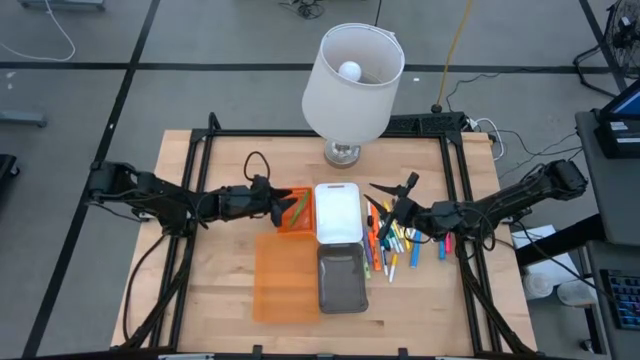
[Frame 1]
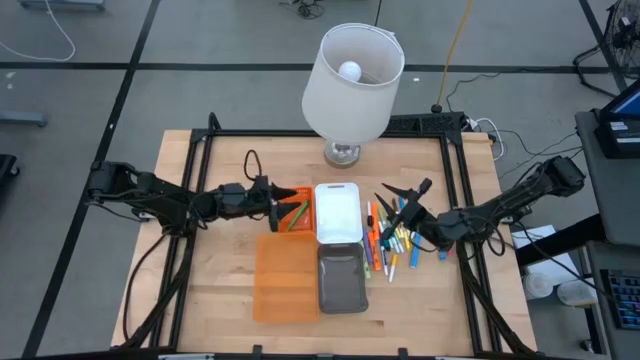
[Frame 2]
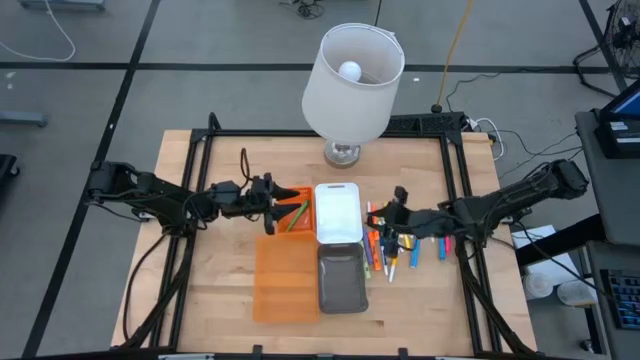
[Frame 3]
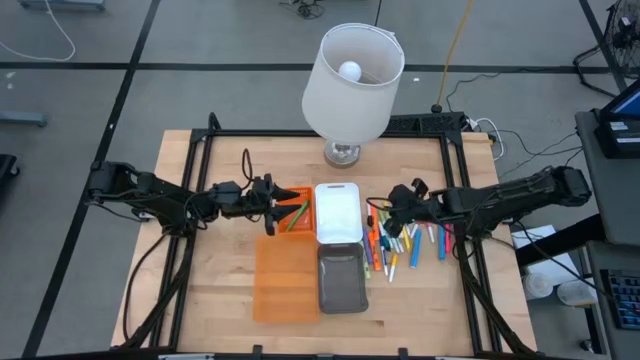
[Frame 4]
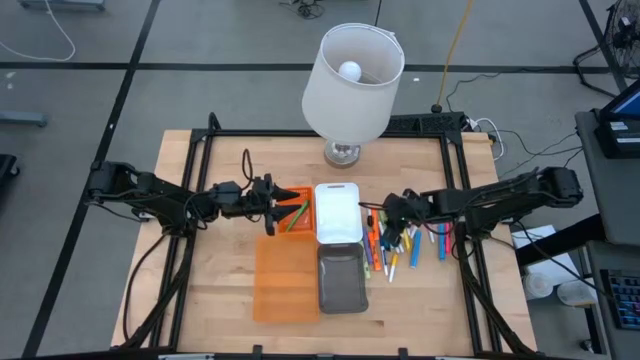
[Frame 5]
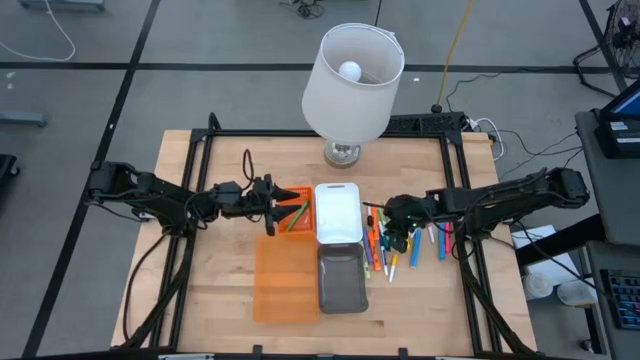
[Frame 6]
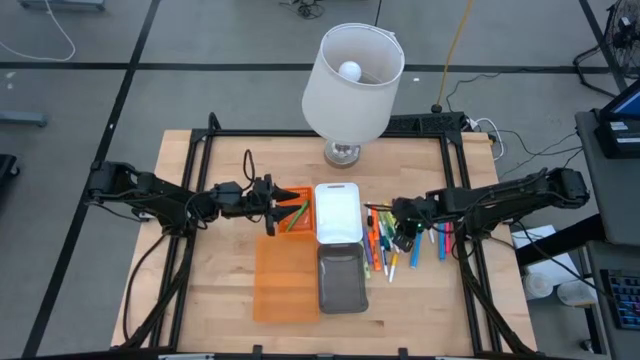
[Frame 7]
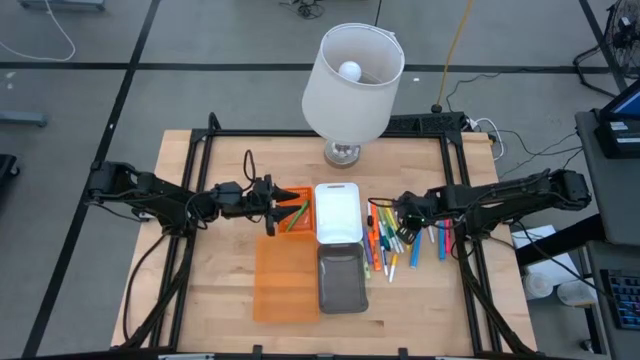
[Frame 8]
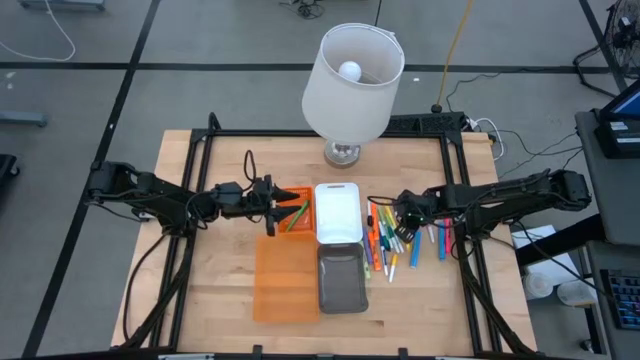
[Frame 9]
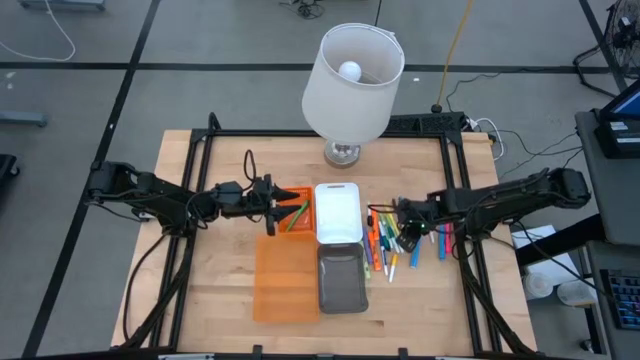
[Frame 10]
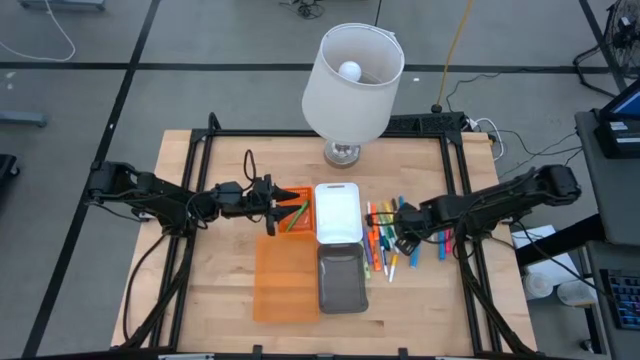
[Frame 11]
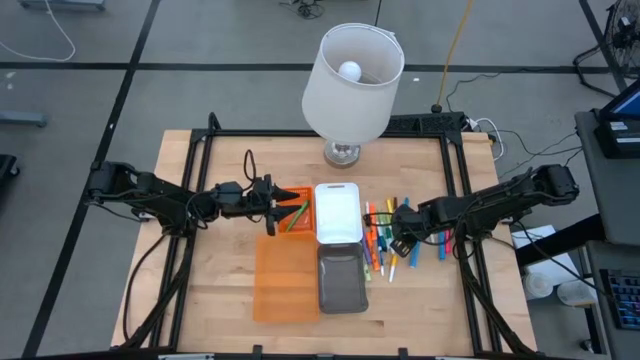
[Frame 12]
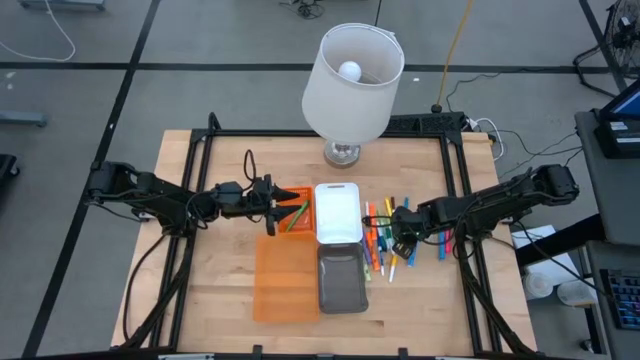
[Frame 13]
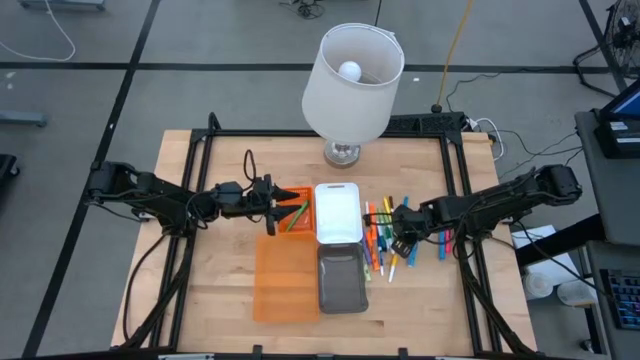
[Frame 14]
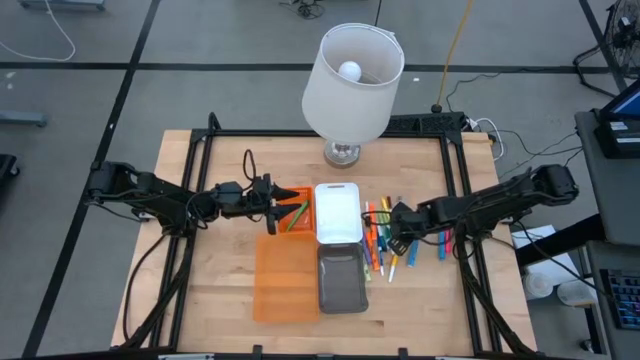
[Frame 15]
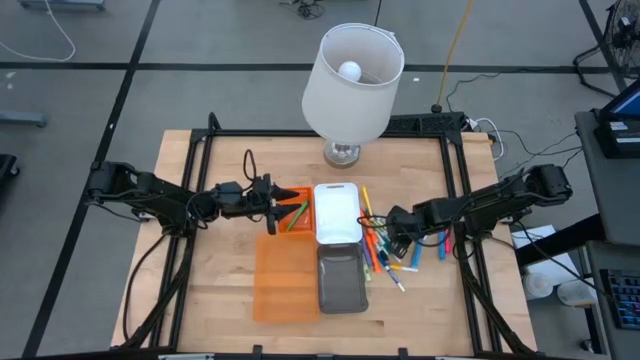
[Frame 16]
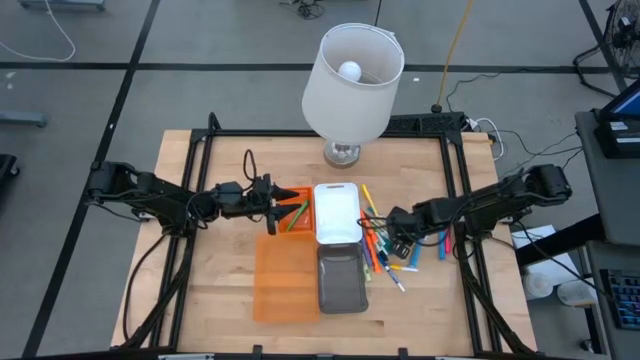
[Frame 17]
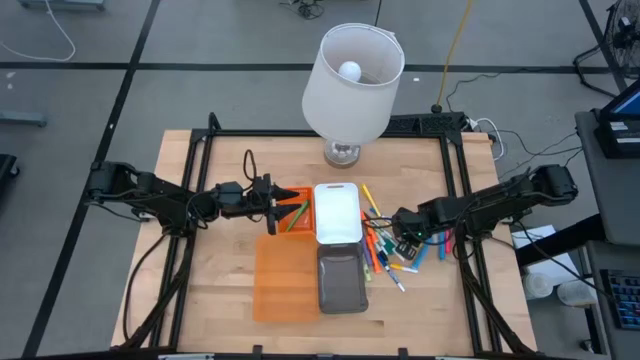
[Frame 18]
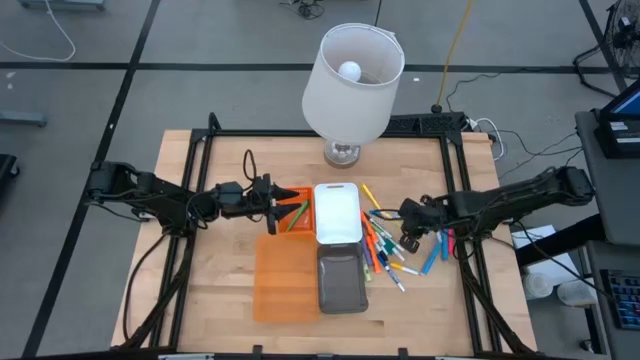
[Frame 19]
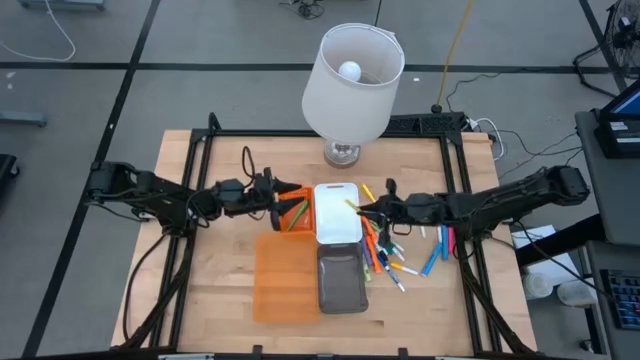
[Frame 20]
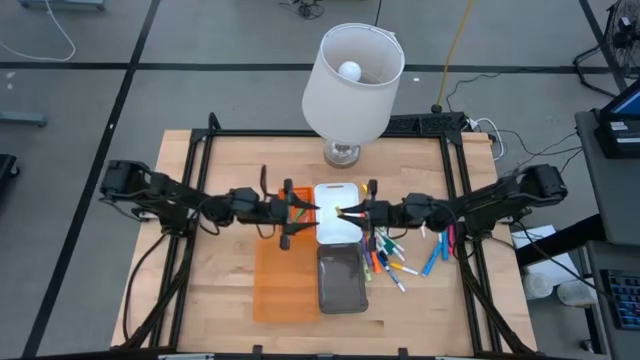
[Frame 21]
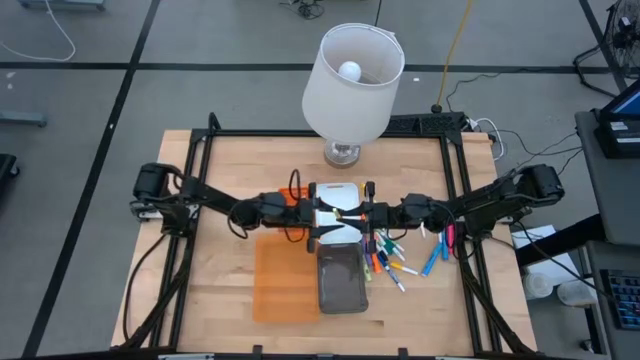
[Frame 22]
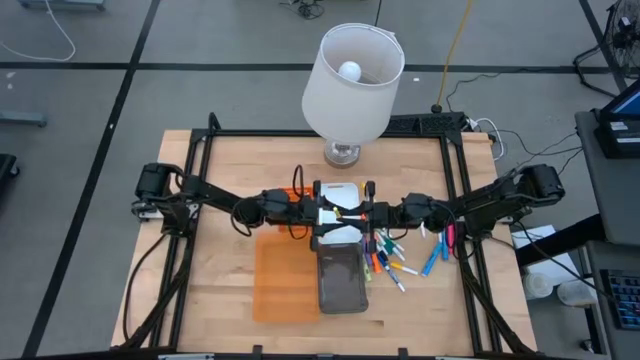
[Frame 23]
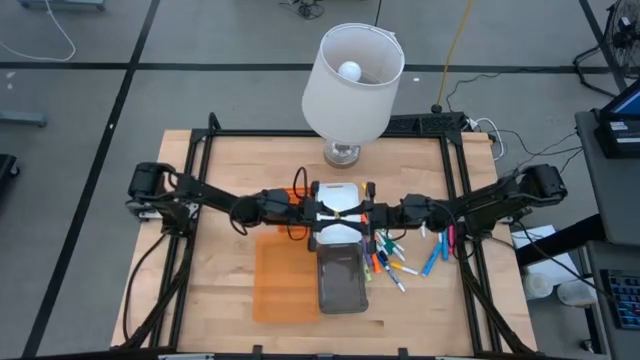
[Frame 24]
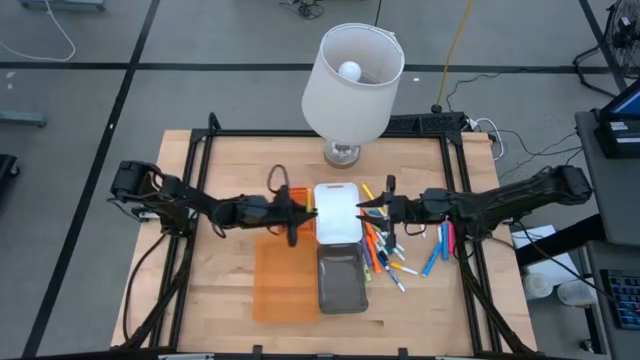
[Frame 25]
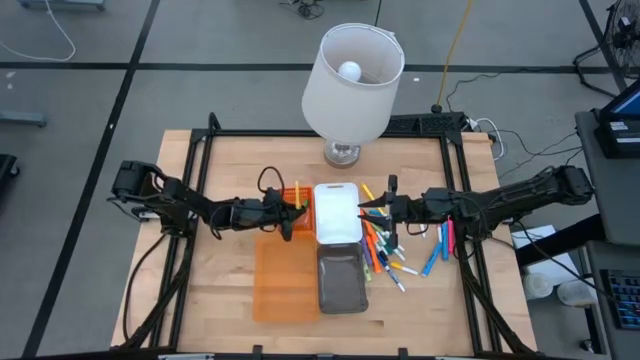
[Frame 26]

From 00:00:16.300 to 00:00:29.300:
Task: Pick & Place Markers
Put the right yellow pen into the orange basket

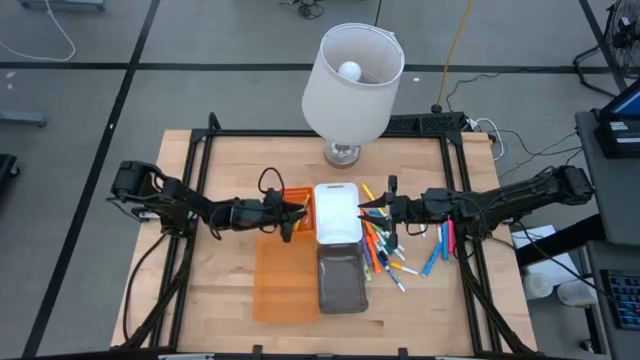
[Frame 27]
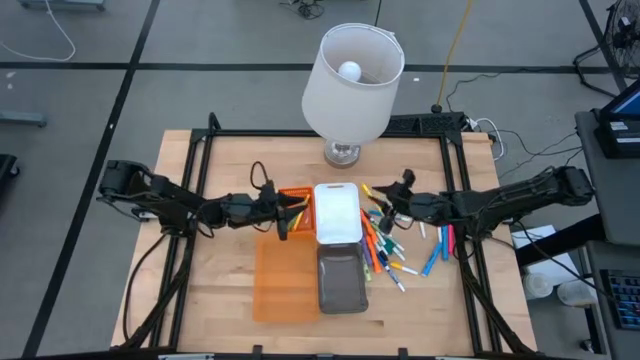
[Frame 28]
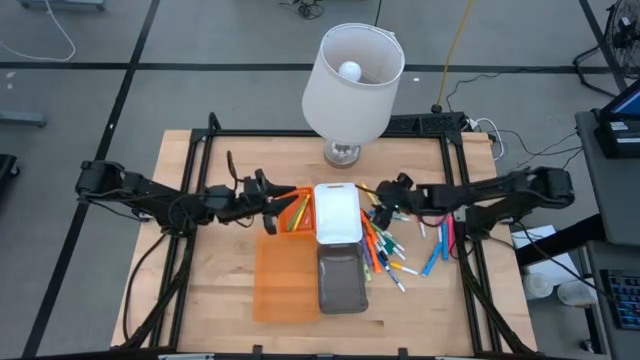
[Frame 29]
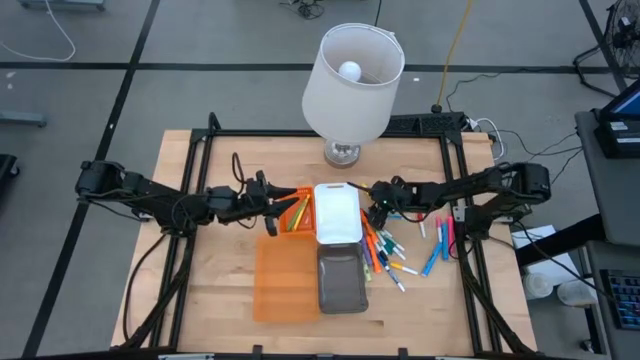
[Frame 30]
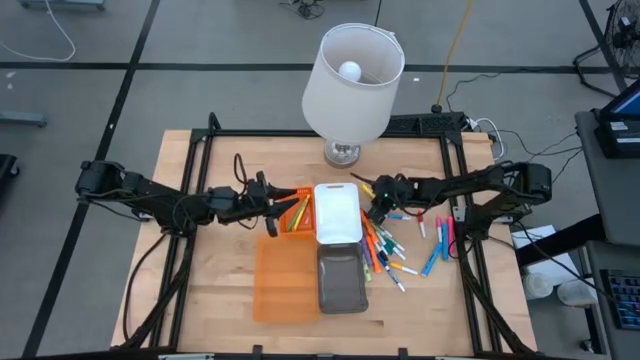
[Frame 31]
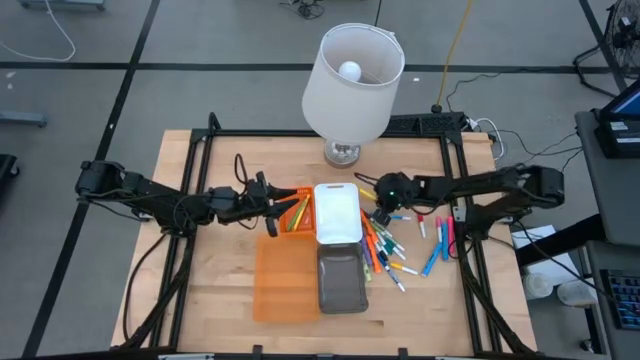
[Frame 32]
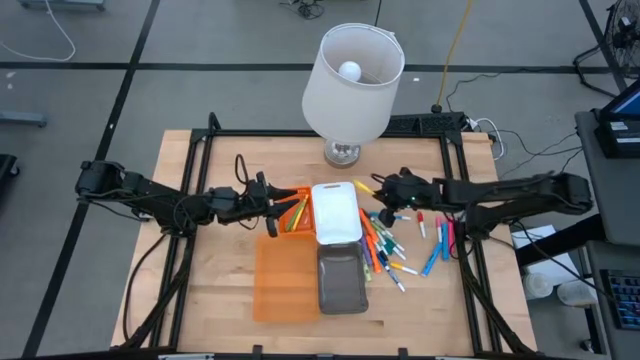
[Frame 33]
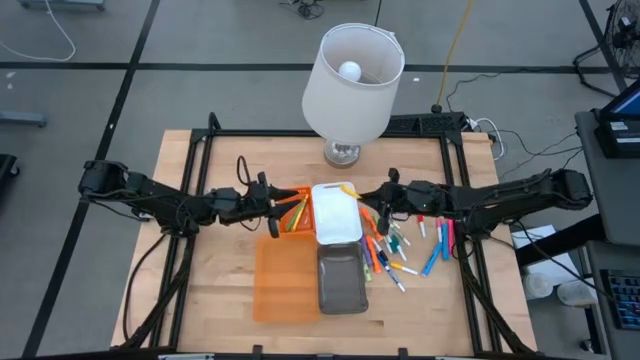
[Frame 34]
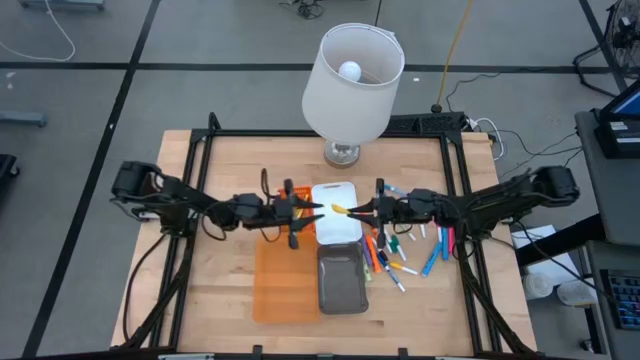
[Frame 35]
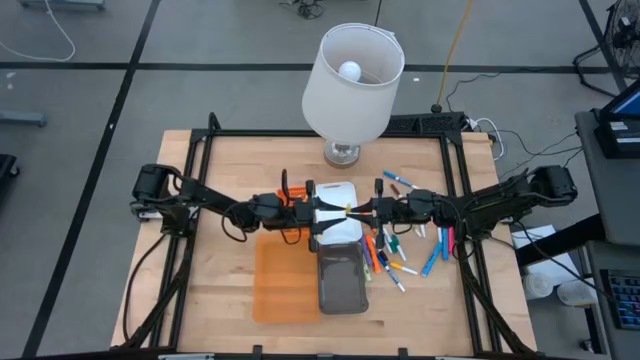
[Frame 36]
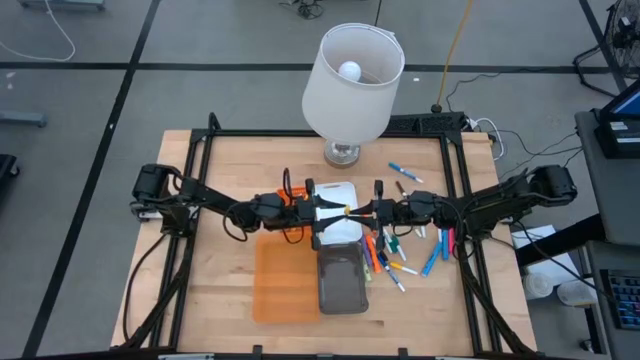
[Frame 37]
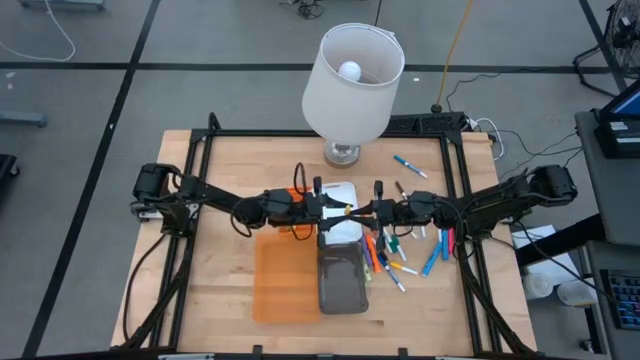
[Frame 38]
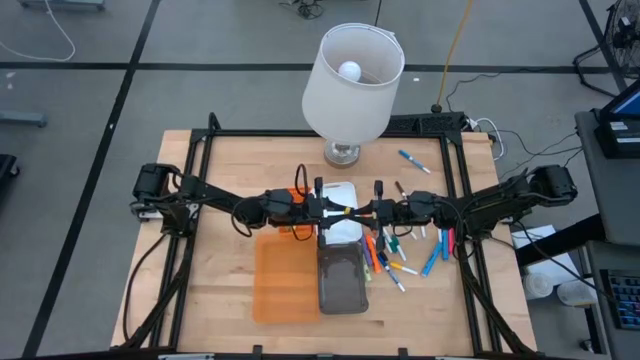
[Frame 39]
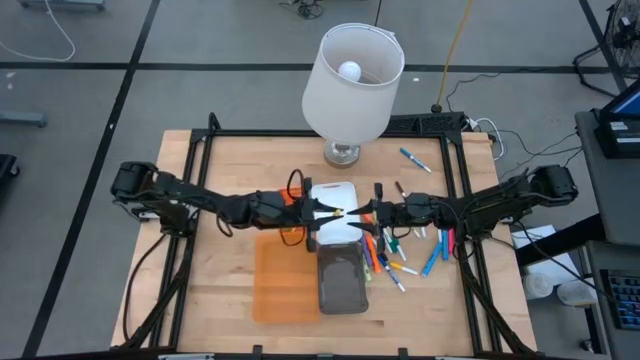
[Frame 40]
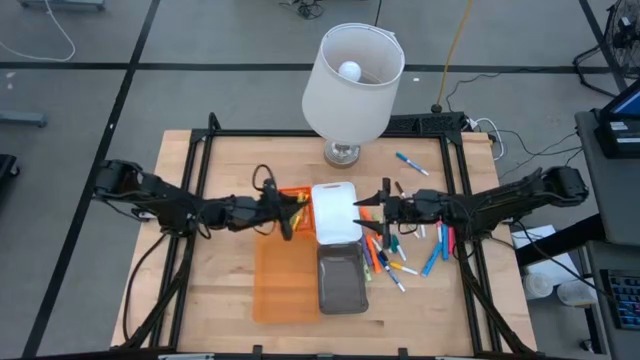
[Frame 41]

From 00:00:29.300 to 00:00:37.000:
Put the yellow pen into the orange basket

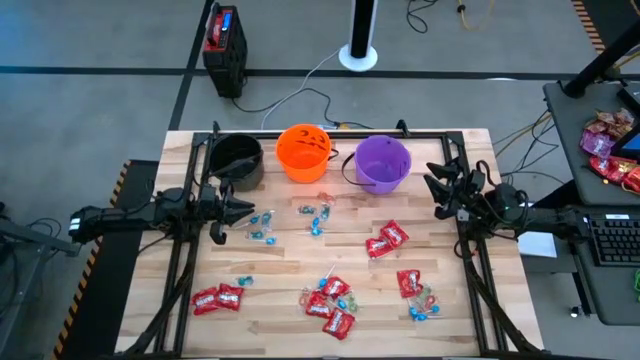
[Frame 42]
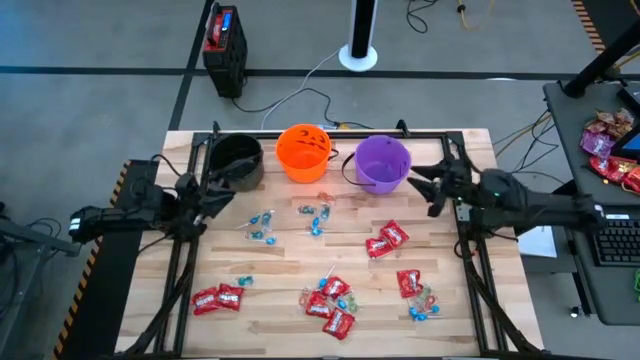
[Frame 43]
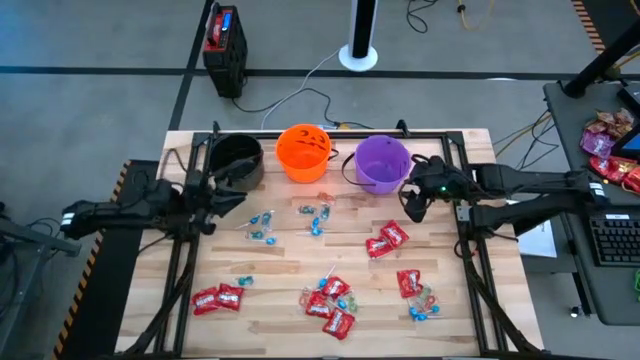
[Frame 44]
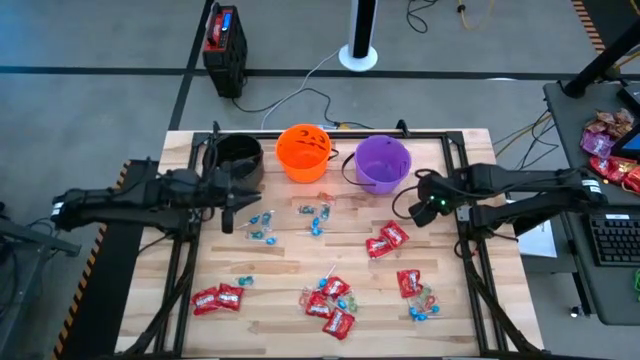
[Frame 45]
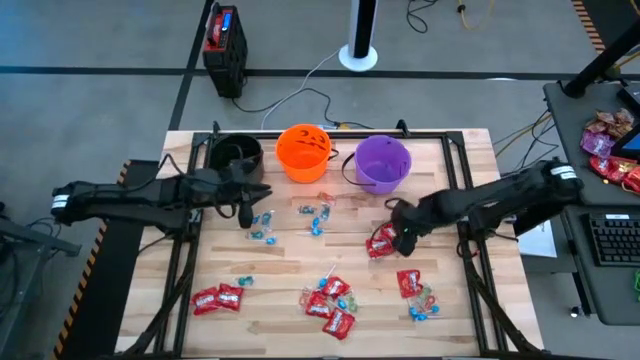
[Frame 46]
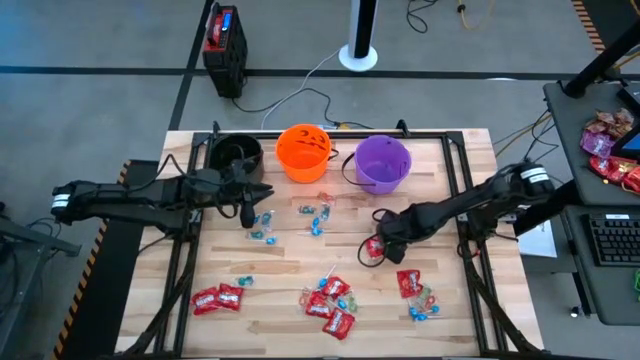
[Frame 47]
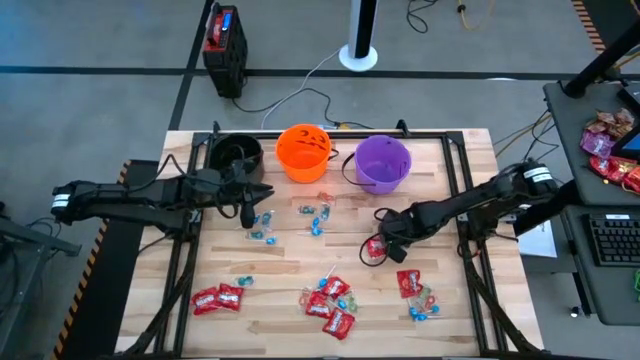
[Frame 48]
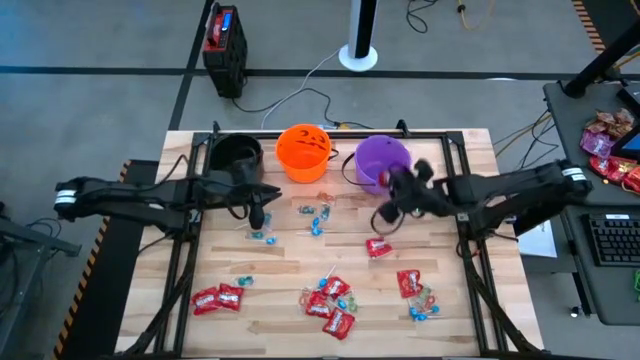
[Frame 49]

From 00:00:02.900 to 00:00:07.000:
Task: Sort candy by brand, put in halloween buckets
Put the red candy into the violet bucket
